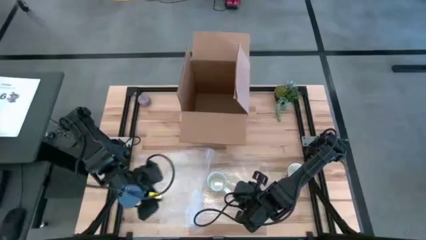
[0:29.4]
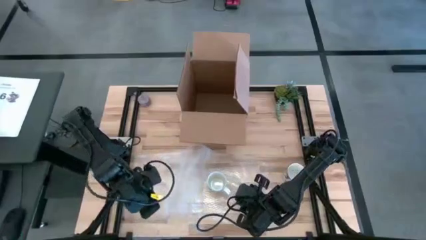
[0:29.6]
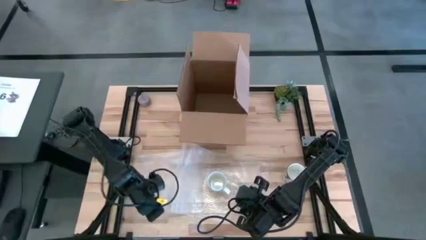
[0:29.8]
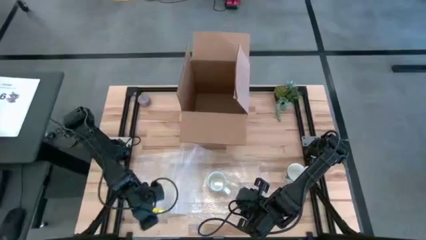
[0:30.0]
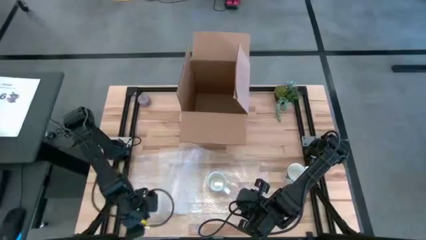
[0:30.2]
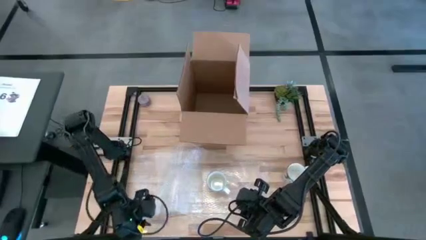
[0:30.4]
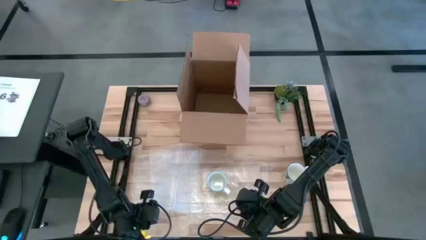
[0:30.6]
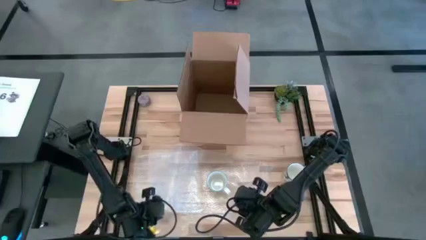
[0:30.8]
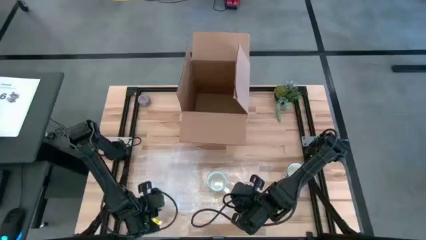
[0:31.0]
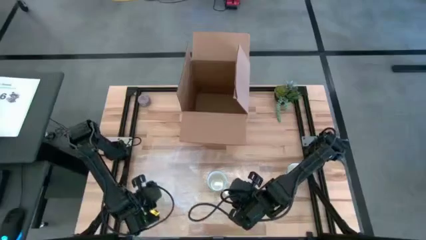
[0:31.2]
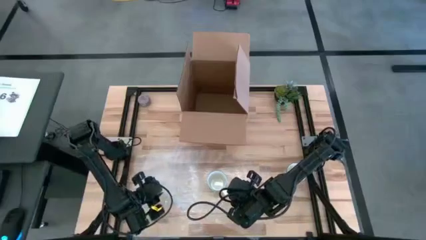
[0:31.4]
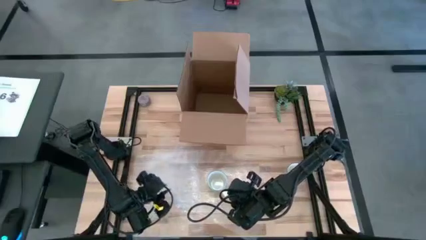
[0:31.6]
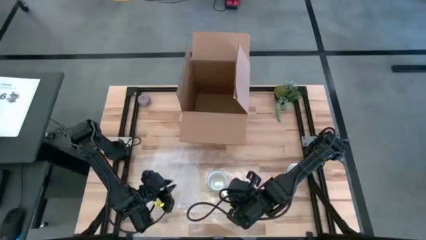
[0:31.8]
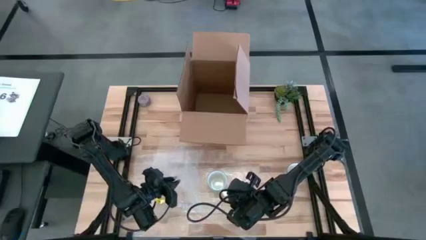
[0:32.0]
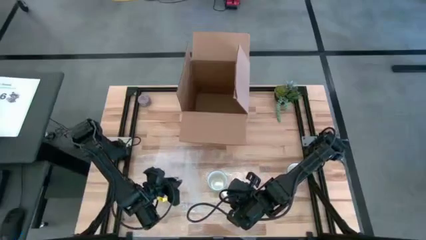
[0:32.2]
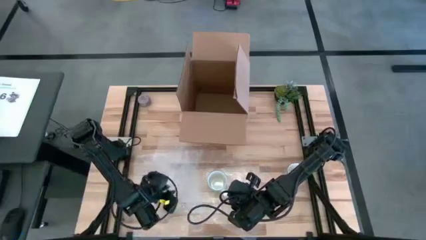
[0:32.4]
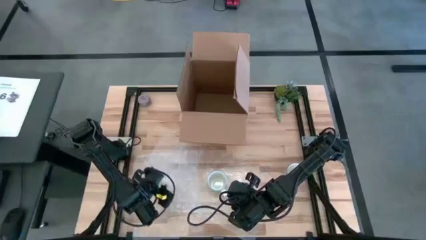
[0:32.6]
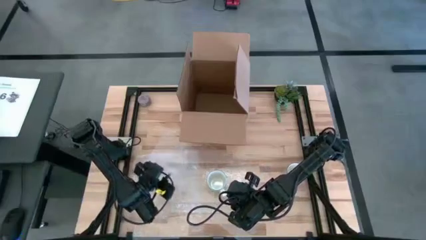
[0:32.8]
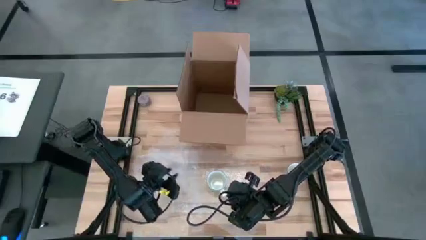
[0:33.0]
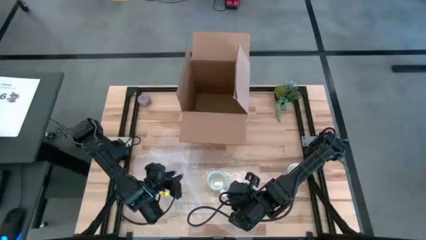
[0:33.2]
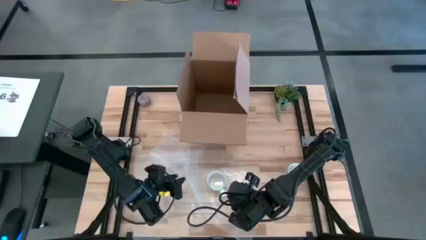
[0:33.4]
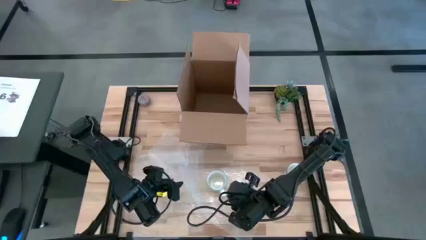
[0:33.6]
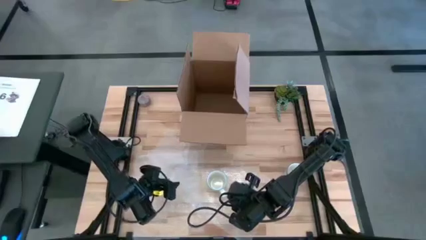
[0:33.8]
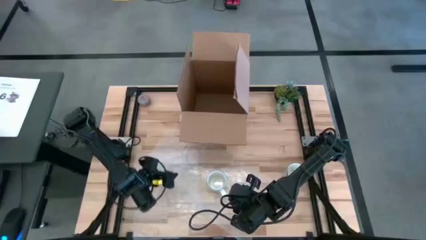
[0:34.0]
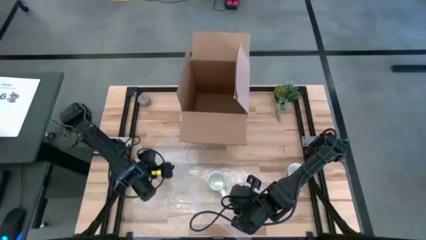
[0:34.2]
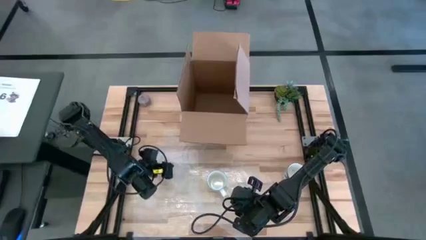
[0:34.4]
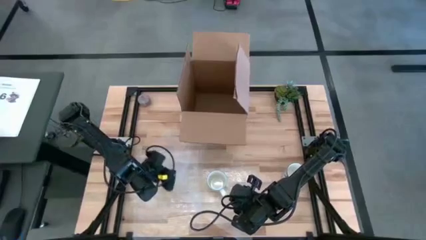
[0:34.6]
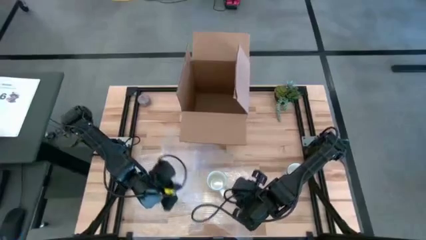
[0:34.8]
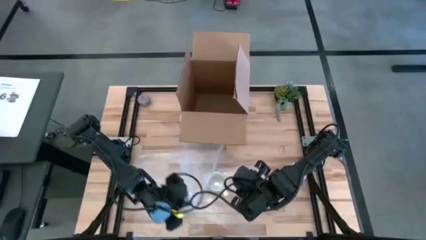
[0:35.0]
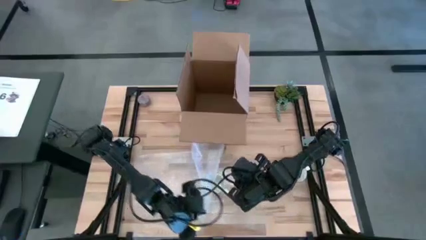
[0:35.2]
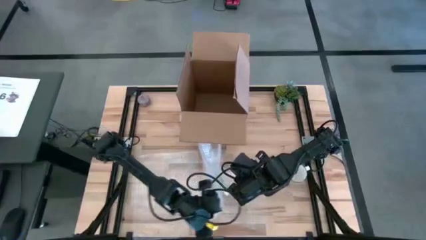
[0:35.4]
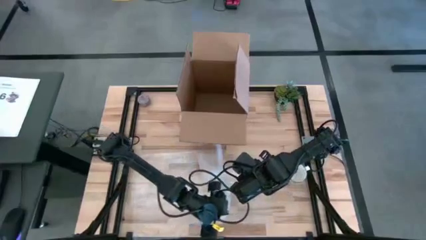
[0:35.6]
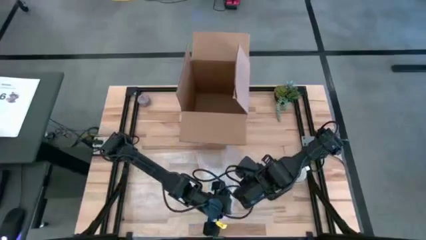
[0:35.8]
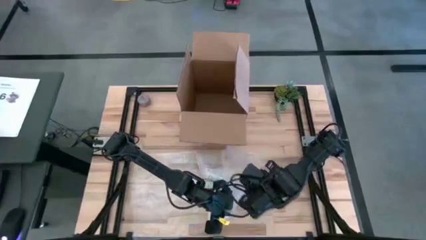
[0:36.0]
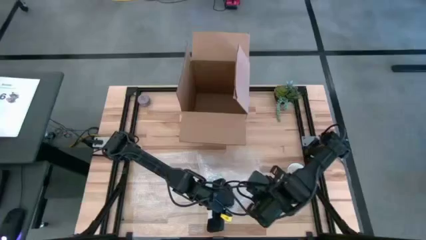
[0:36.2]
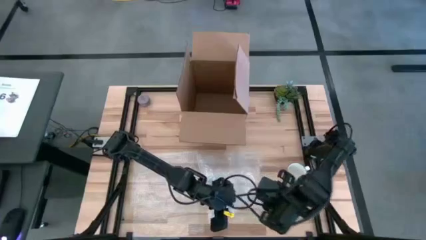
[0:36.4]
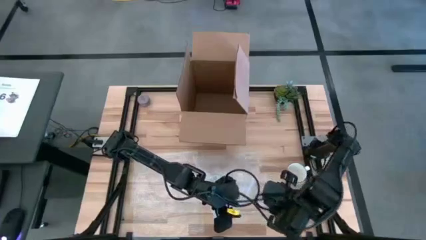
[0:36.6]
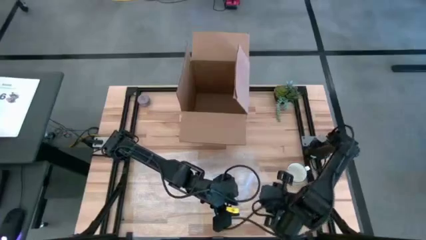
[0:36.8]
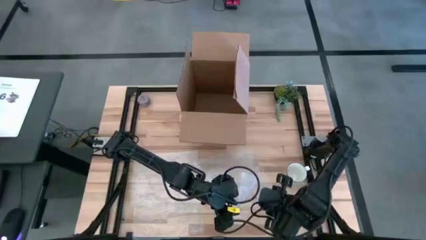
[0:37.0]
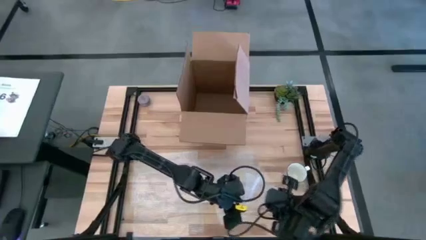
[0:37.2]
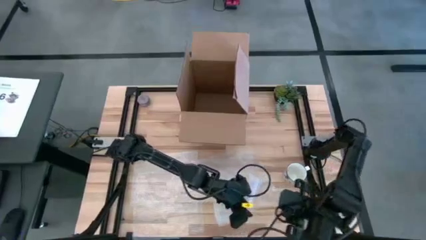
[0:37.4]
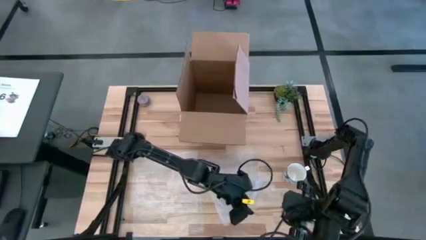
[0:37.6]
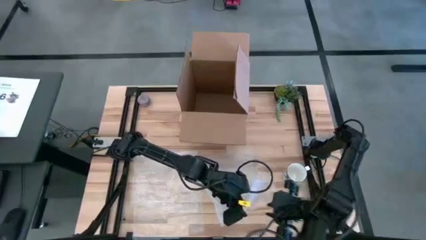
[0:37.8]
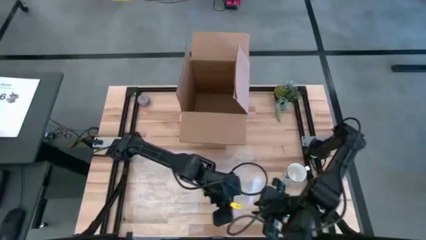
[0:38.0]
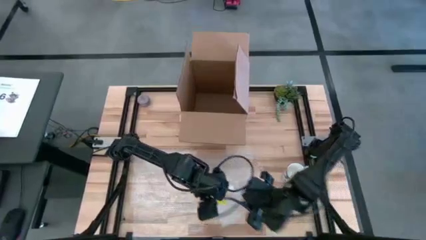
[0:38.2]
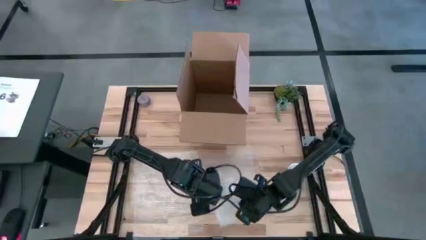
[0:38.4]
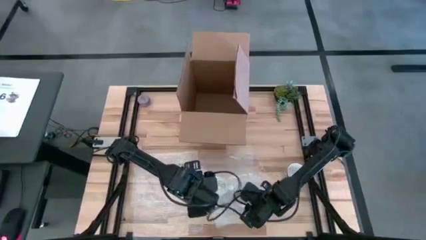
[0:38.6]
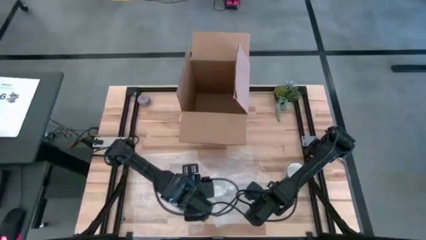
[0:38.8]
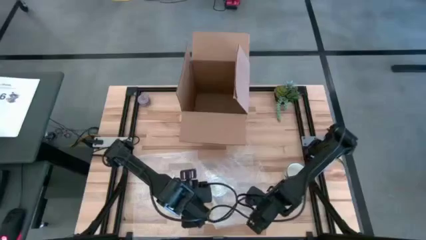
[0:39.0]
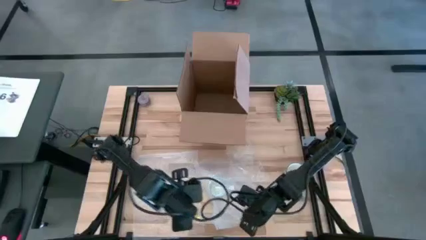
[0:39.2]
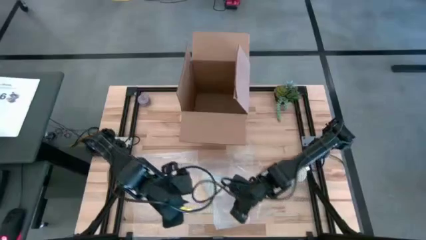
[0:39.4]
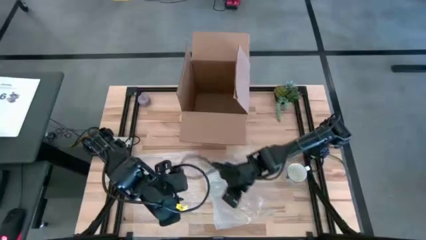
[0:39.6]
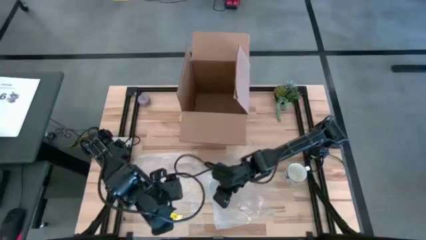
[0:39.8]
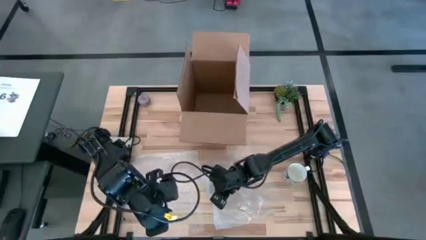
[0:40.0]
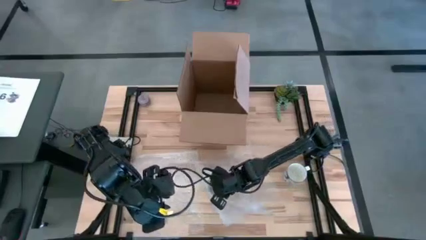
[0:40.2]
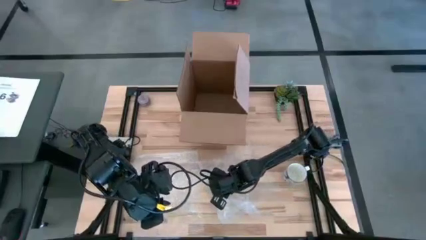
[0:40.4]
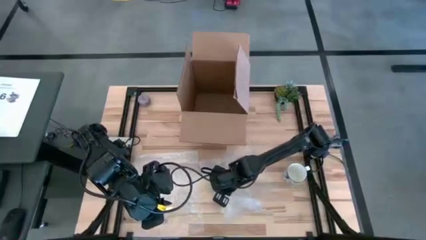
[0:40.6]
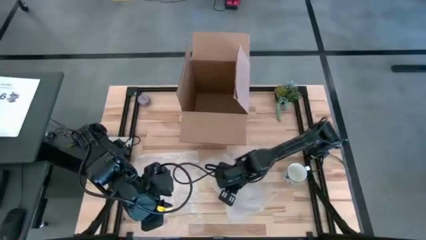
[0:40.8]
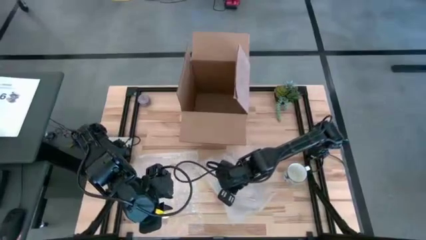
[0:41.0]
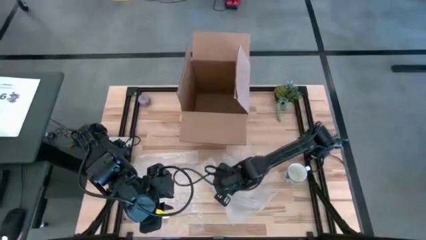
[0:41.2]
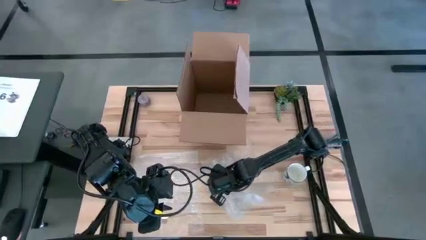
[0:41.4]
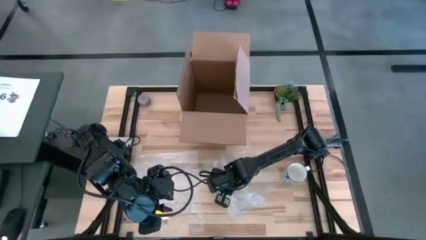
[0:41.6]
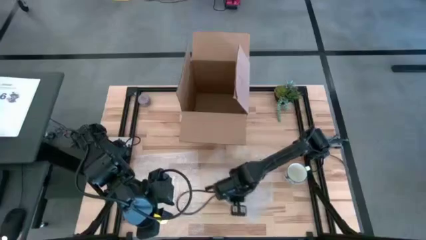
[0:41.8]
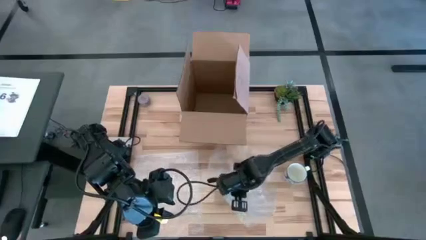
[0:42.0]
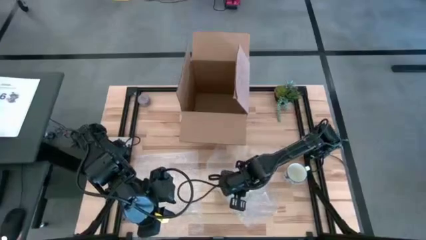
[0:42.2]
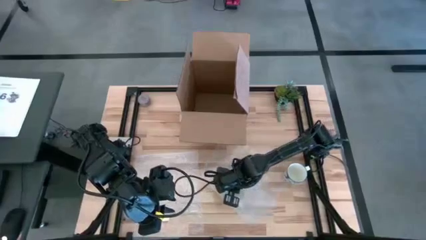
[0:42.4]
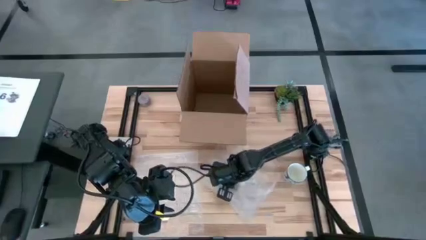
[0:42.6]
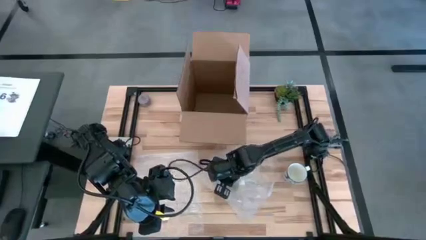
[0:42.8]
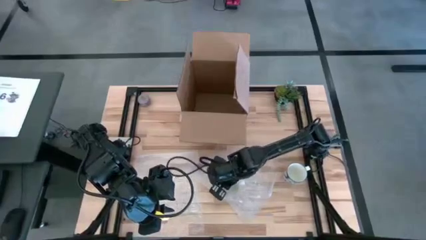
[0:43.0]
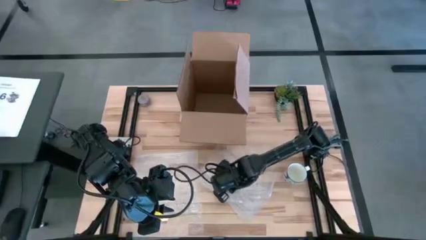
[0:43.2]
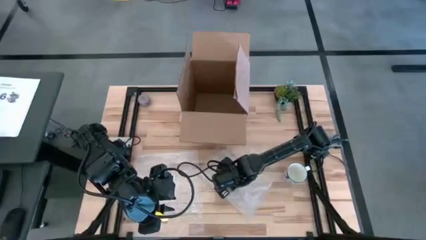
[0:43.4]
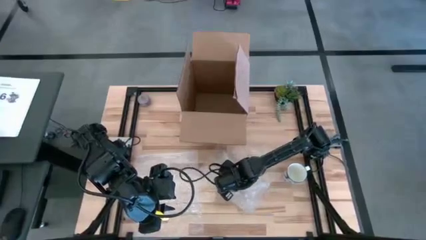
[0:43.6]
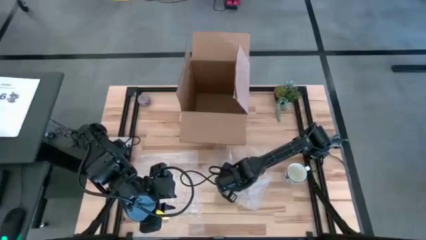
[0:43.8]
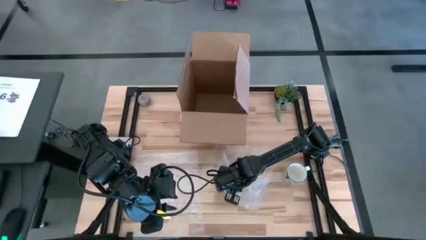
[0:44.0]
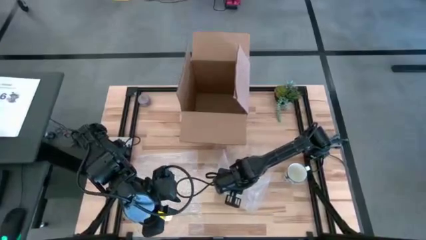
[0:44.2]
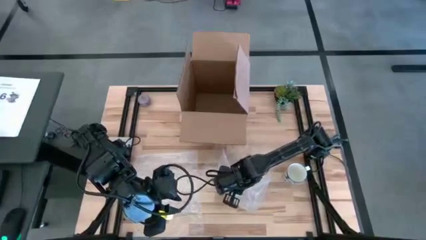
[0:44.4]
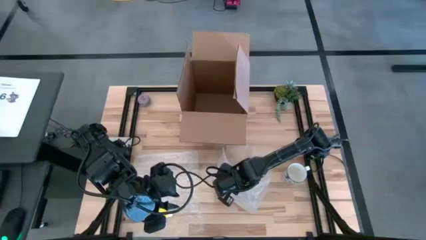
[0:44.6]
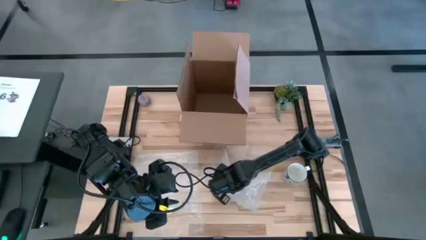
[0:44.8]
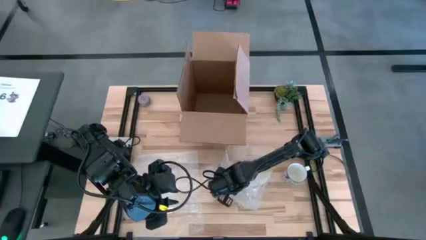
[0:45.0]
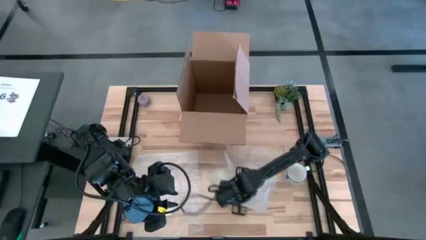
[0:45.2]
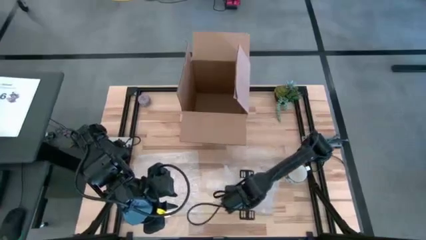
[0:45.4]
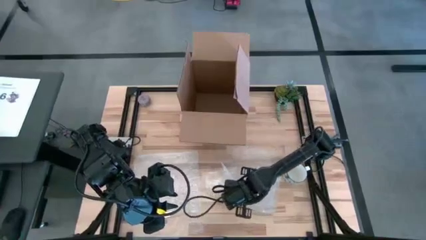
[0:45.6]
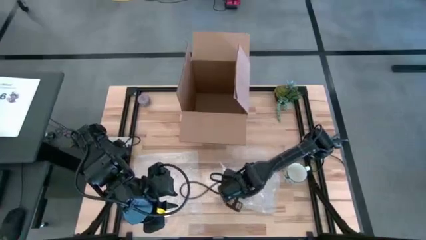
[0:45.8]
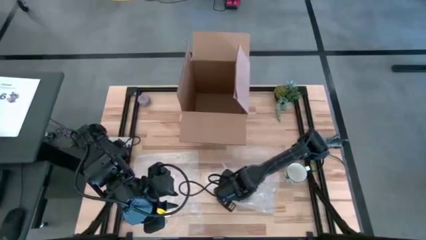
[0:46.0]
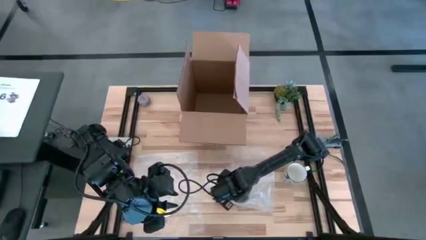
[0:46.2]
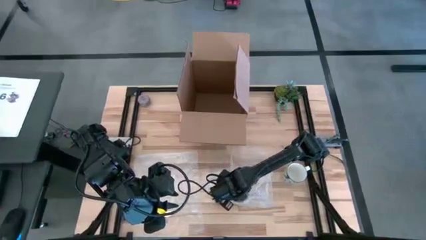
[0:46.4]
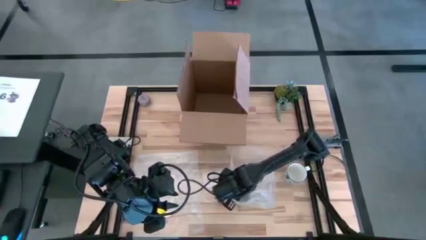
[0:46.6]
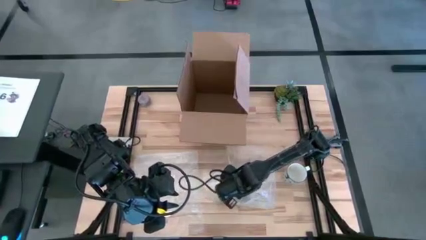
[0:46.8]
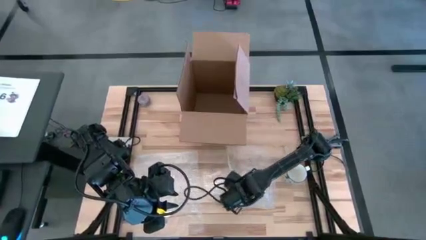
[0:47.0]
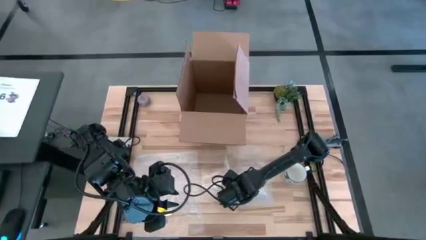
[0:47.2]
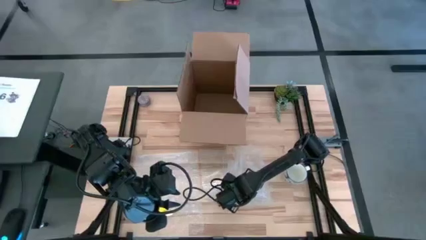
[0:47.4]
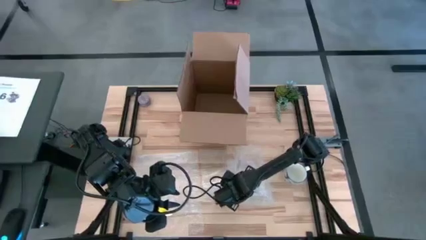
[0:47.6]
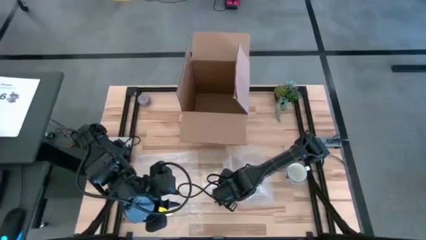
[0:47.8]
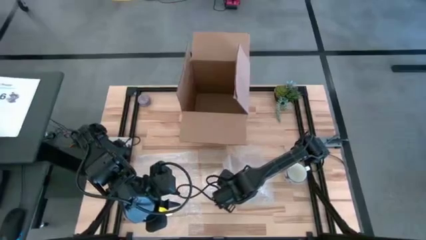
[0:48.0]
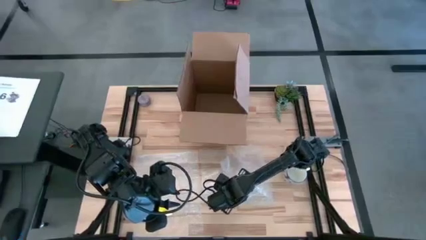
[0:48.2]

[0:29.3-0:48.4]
Task: wrap mug
Wrap the blue patterned mug with the right transparent bubble wrap
